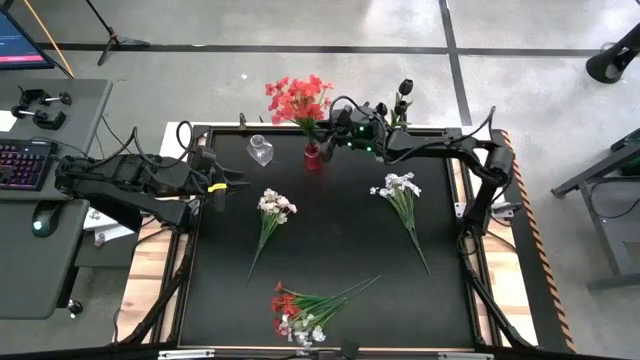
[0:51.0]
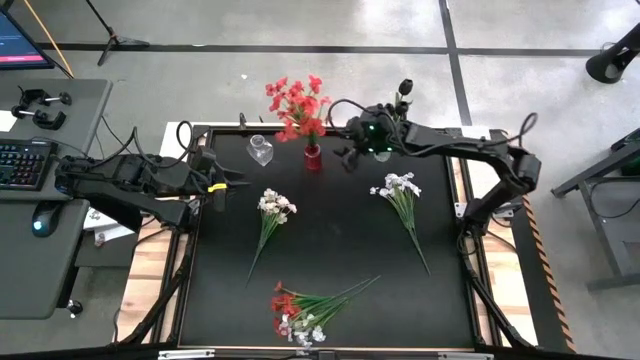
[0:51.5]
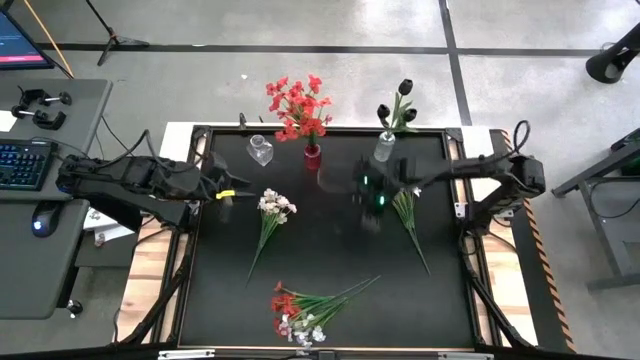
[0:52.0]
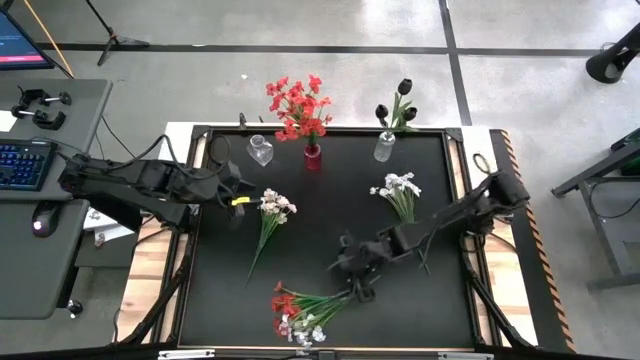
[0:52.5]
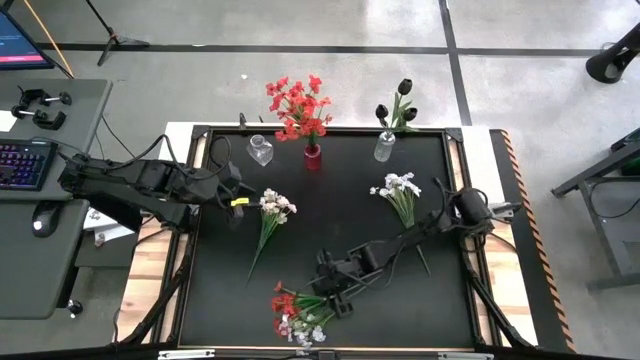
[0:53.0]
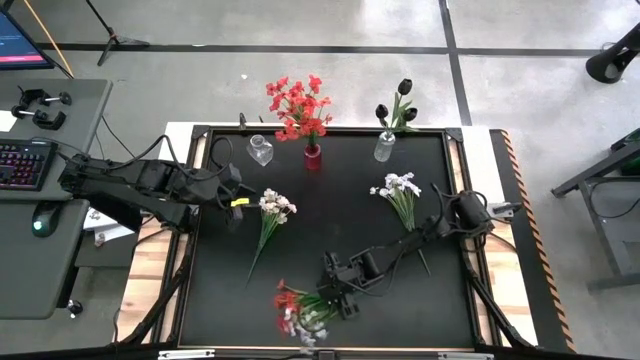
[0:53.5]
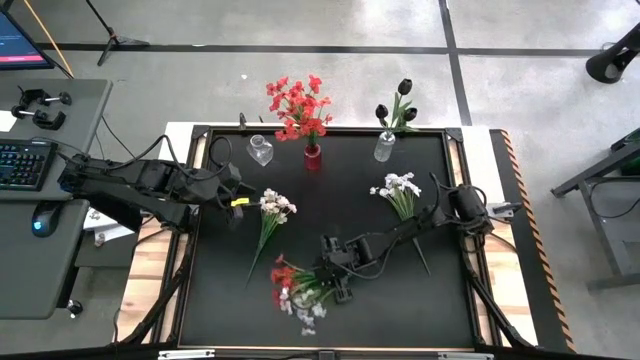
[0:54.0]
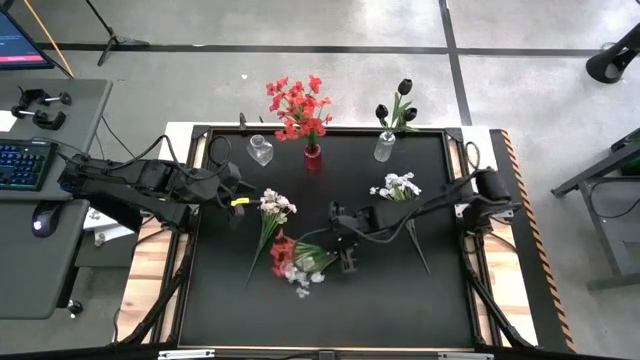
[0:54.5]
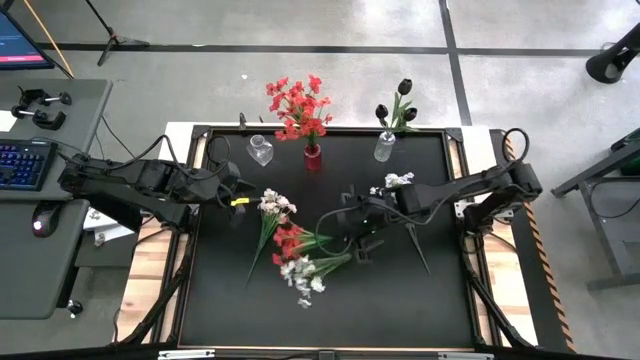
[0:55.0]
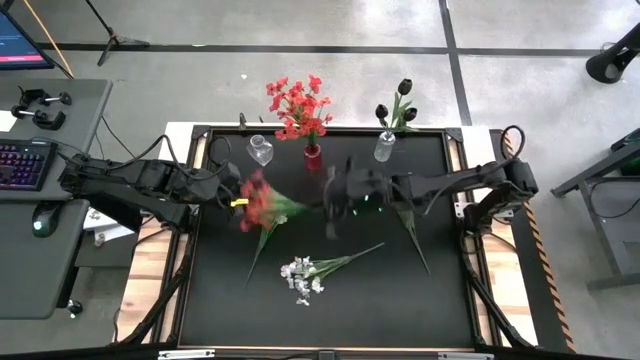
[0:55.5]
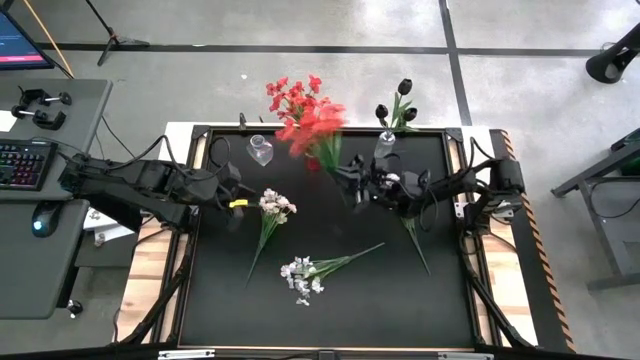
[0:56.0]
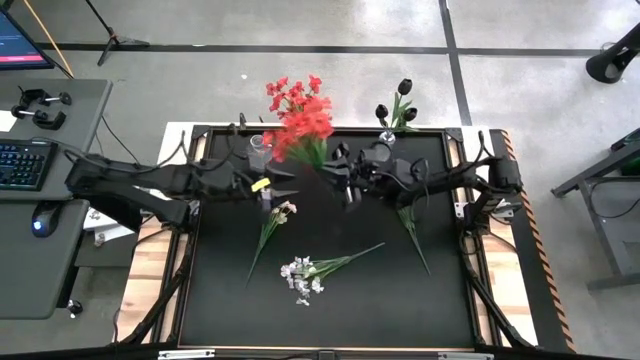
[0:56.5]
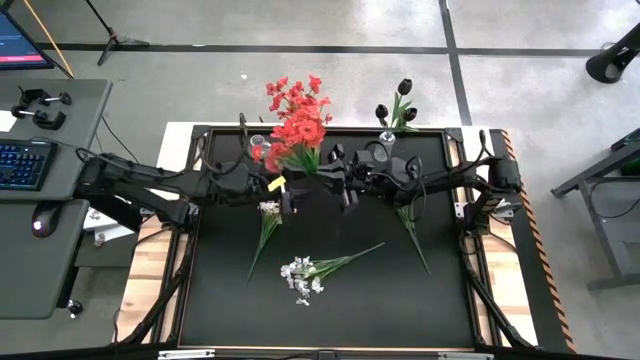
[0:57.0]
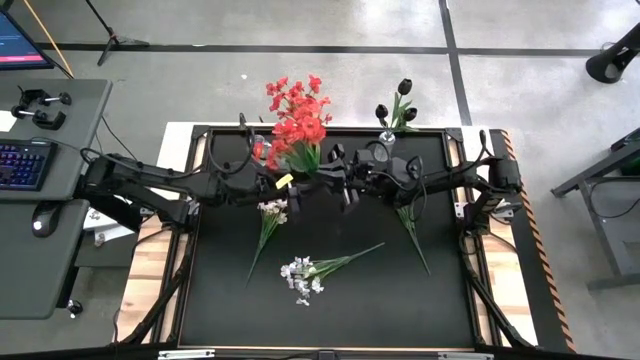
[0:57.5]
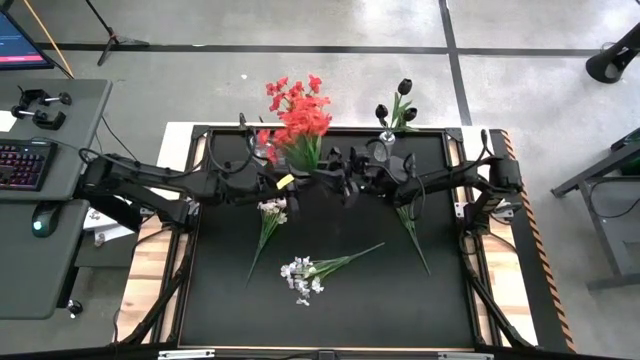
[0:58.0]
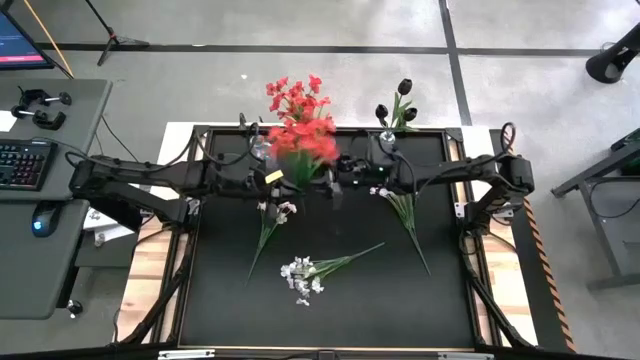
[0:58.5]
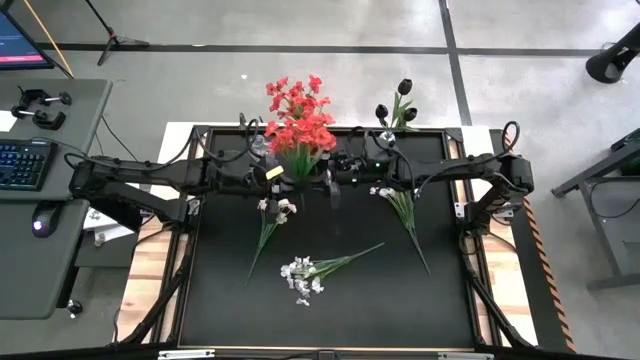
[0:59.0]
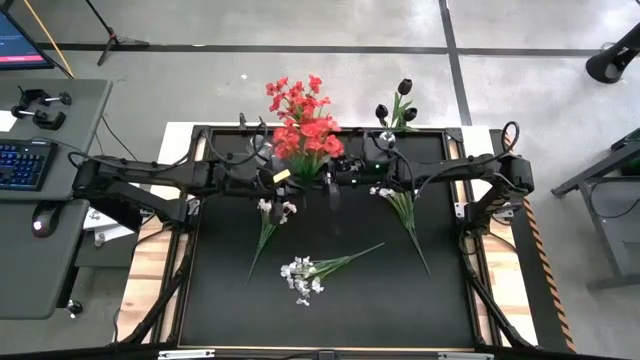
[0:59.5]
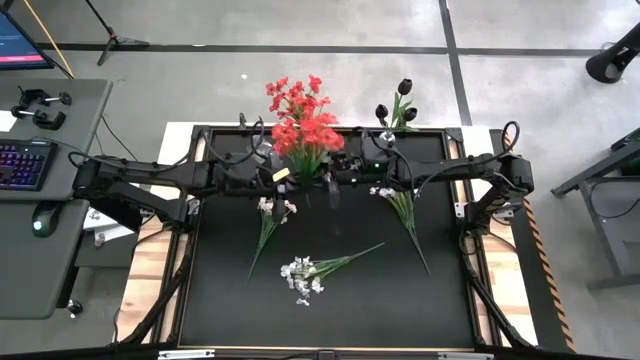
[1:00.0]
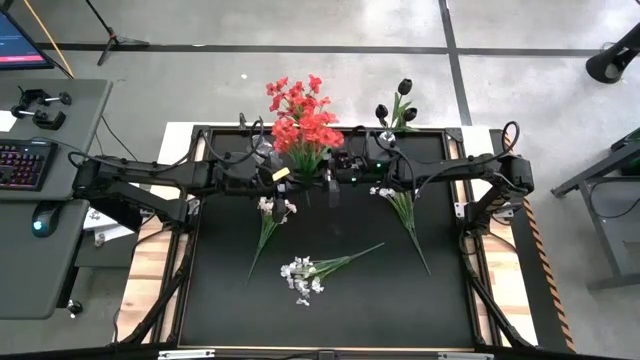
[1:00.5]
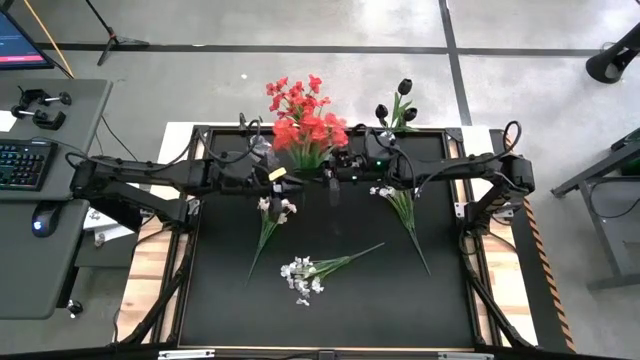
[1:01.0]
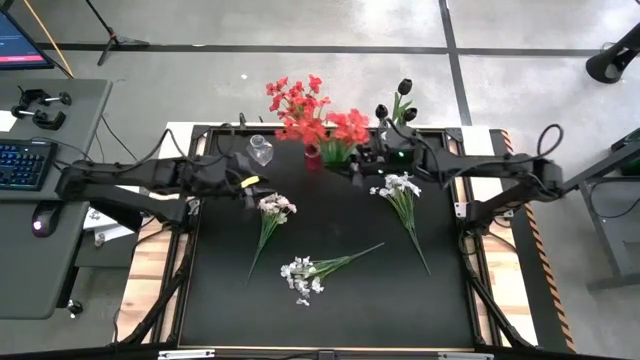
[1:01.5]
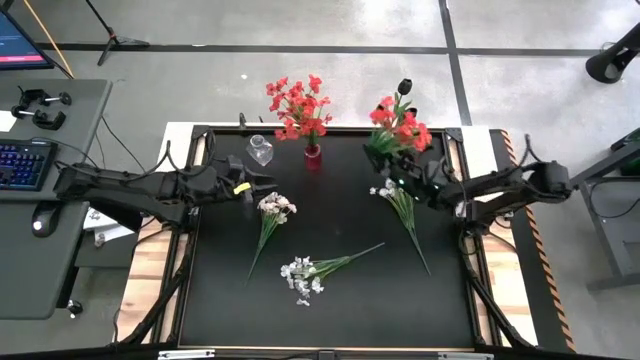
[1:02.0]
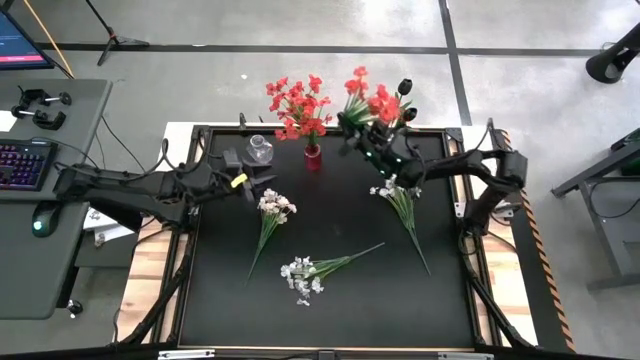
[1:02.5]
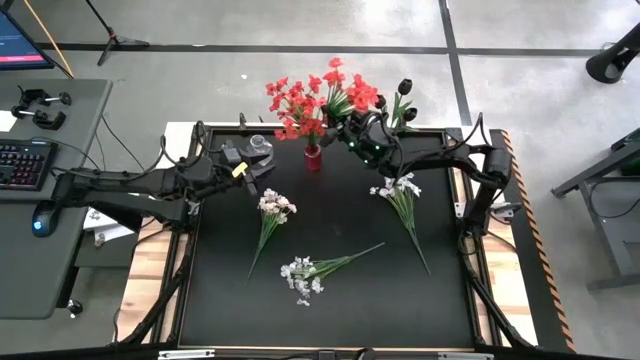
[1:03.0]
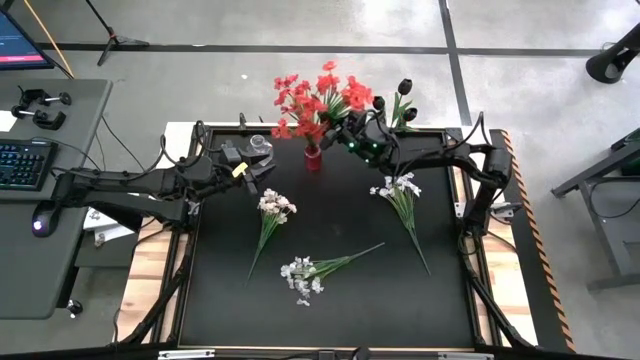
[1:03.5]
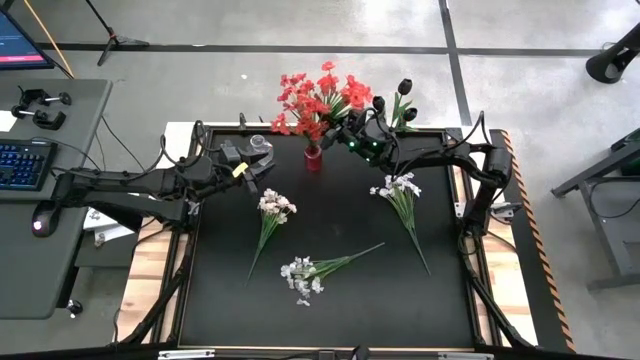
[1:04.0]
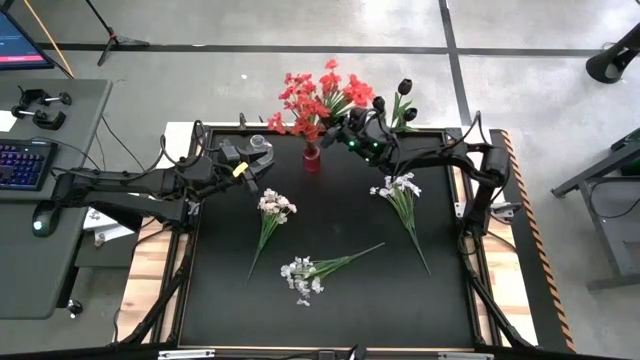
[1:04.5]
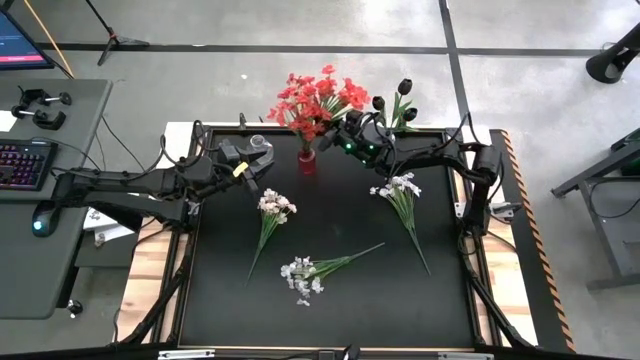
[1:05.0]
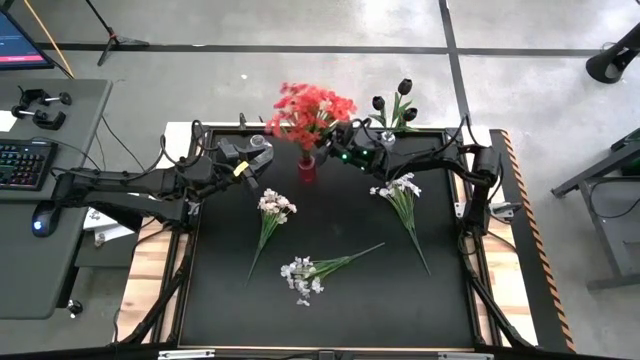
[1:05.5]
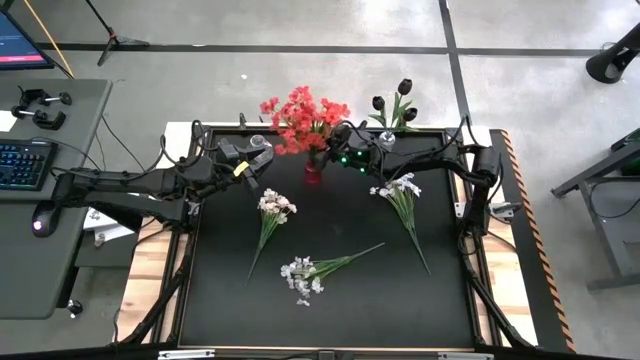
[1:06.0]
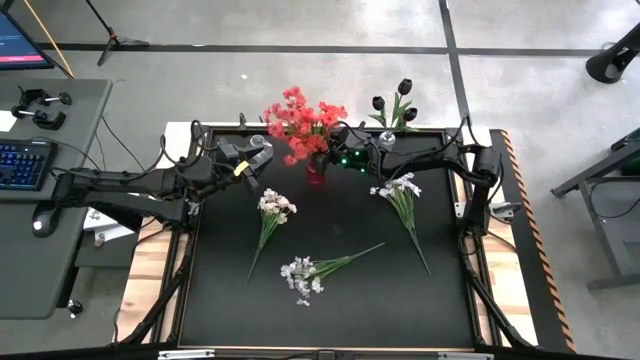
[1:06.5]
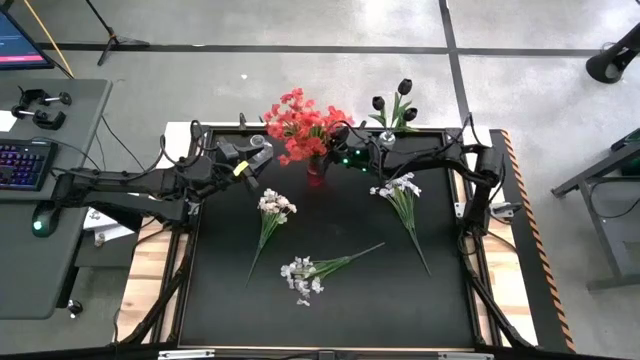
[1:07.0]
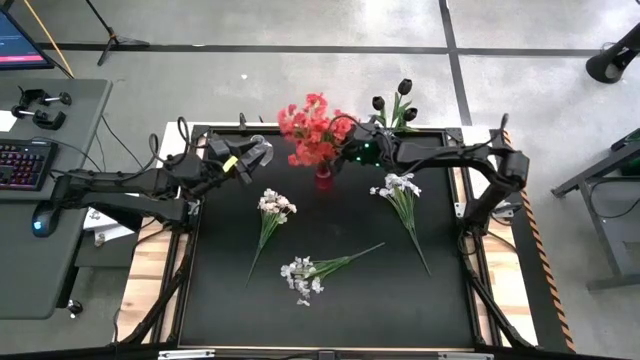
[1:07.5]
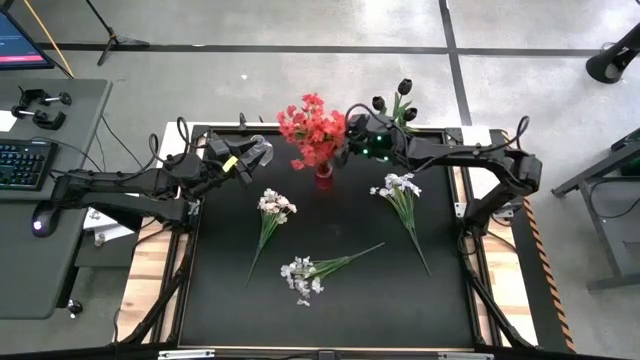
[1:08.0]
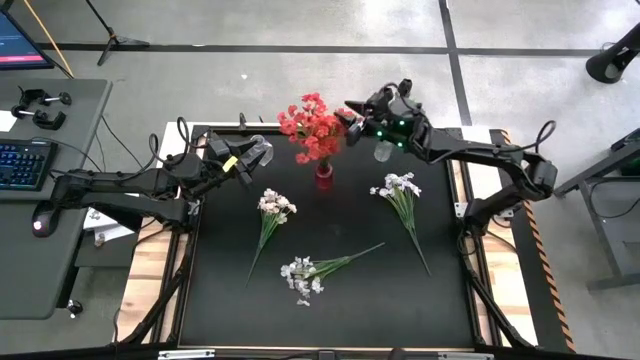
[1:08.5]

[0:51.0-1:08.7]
Task: Sort flowers into vase by color
Put the red flowers into the red flower vase

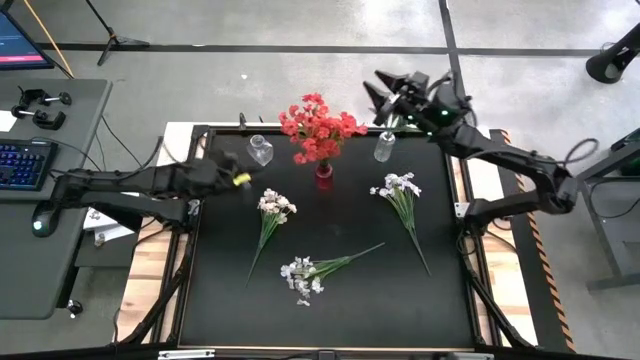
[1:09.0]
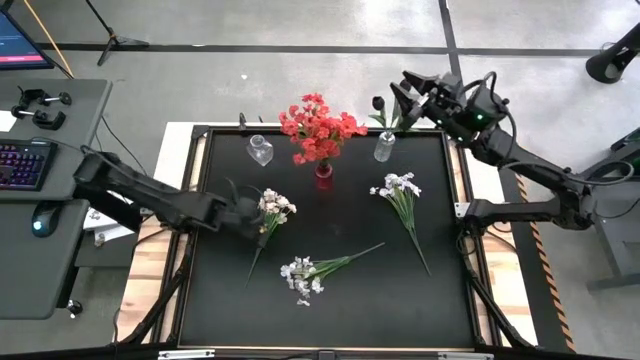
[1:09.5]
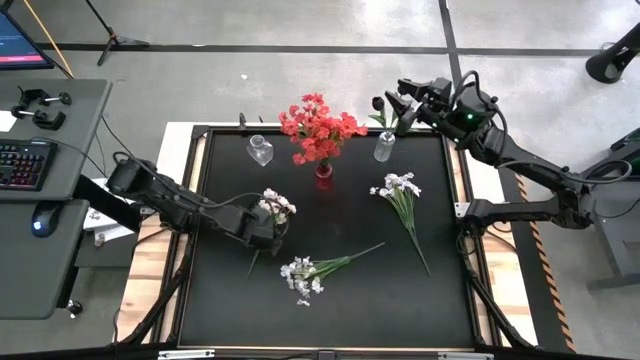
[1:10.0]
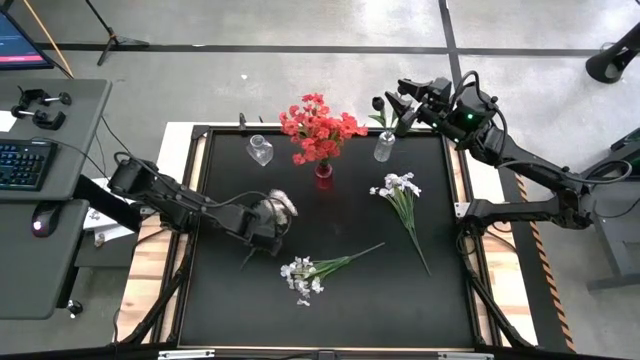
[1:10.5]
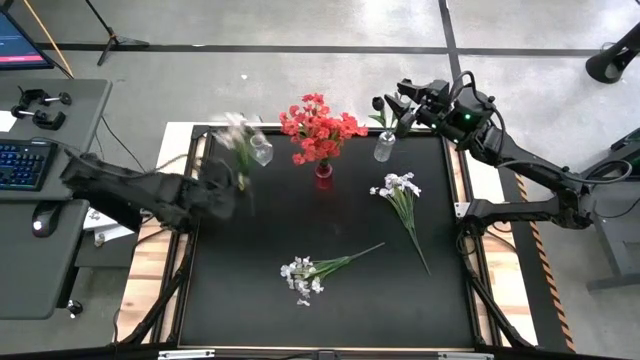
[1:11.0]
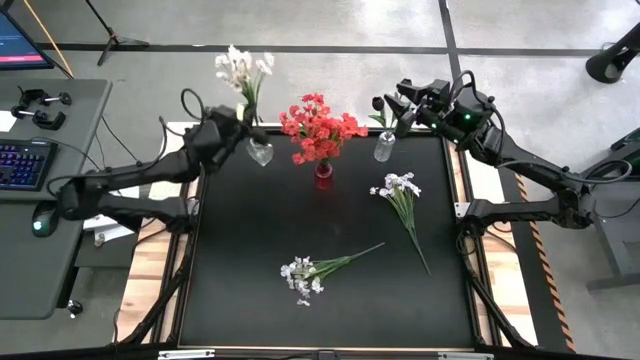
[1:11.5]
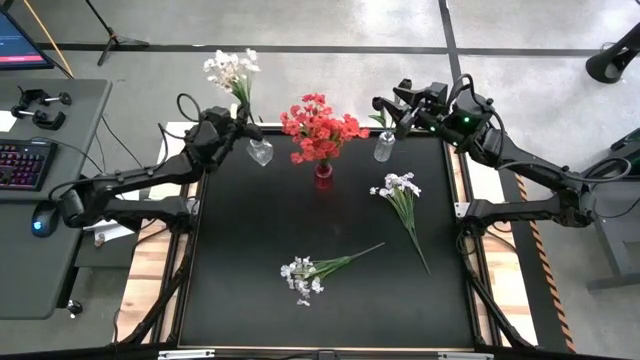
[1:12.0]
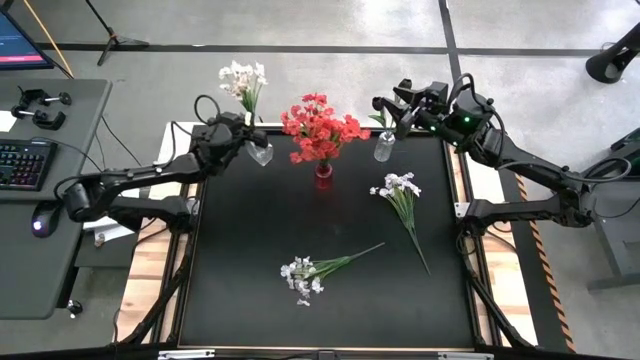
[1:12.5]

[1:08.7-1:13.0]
Put the top left white flowers into the left transparent flower vase
